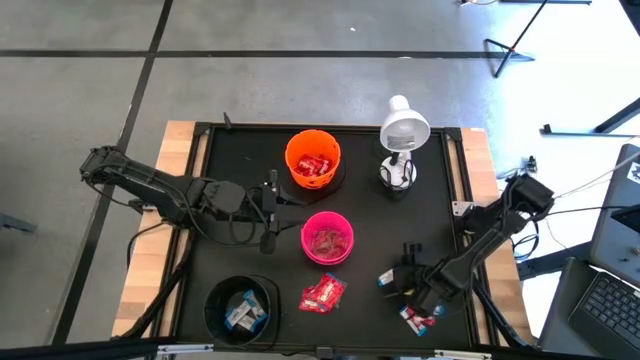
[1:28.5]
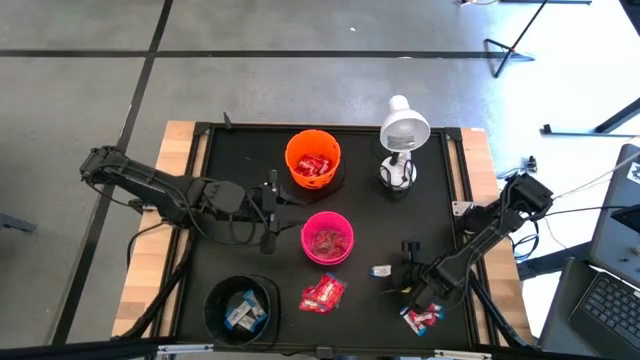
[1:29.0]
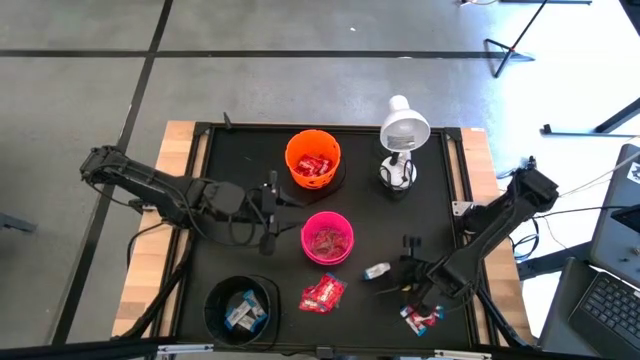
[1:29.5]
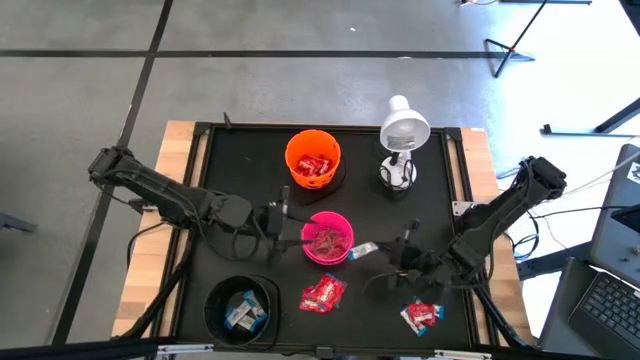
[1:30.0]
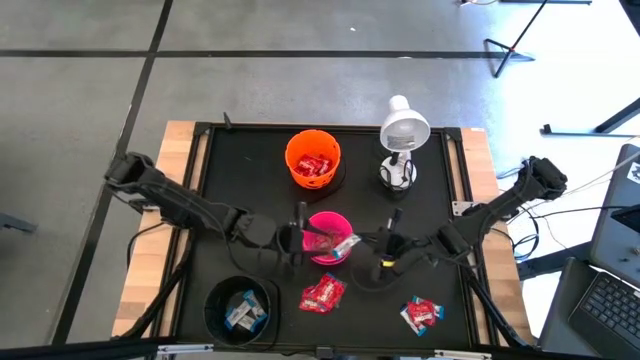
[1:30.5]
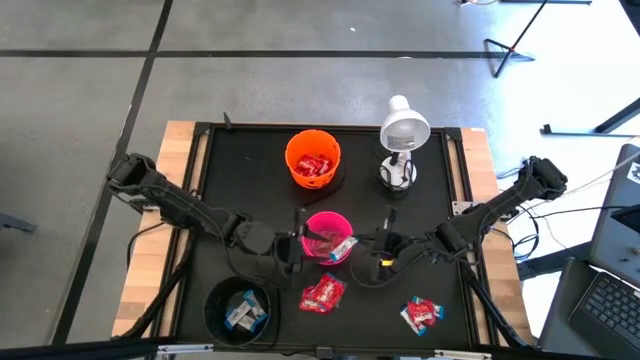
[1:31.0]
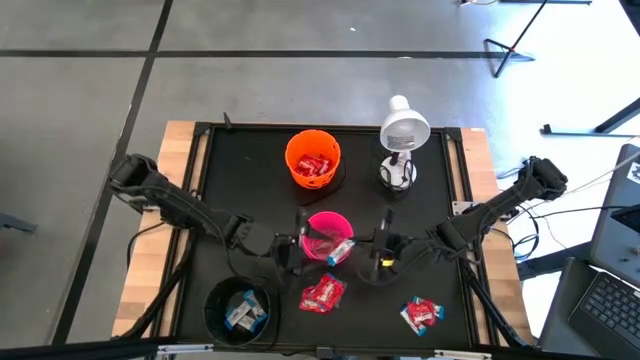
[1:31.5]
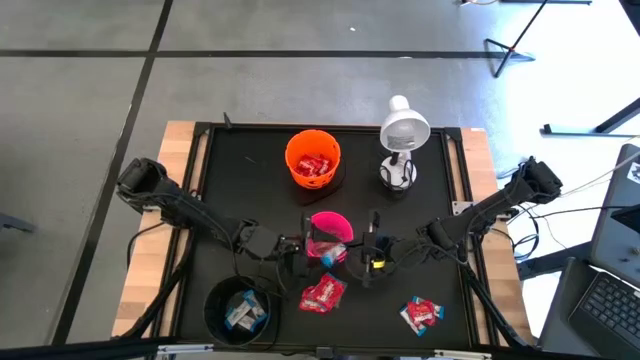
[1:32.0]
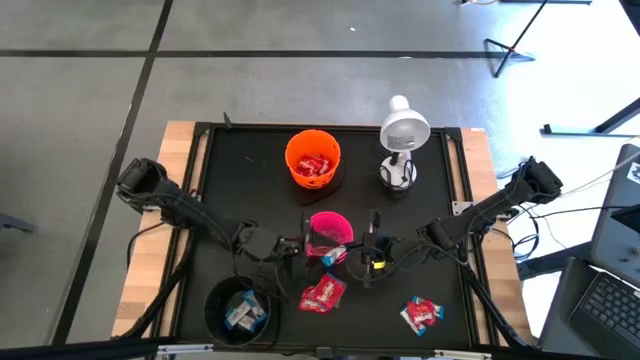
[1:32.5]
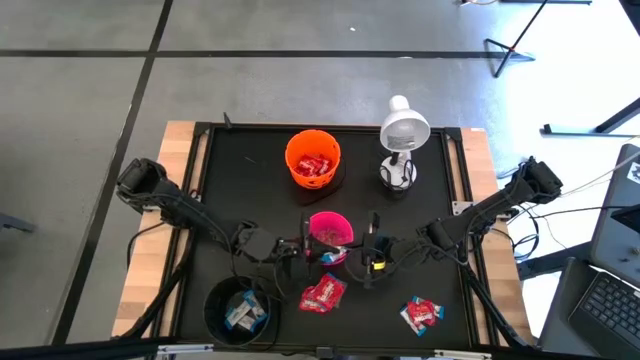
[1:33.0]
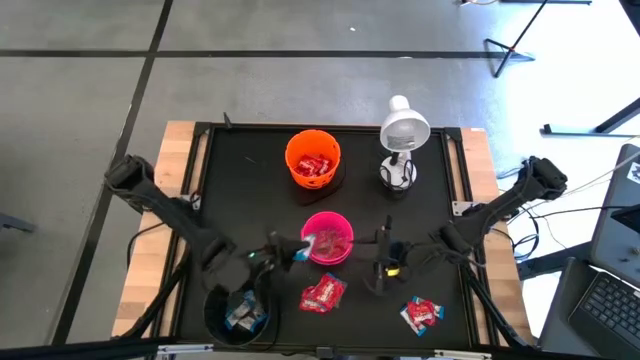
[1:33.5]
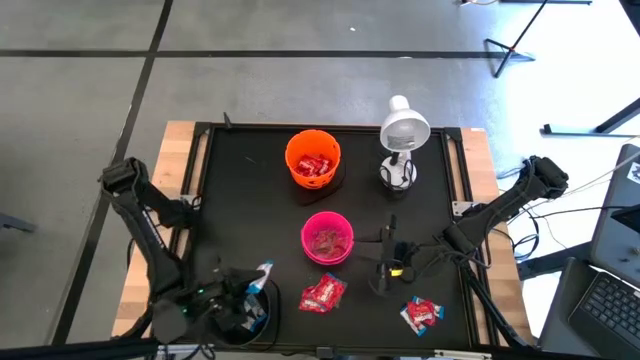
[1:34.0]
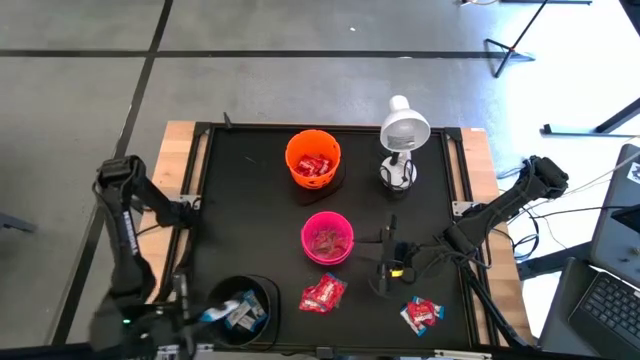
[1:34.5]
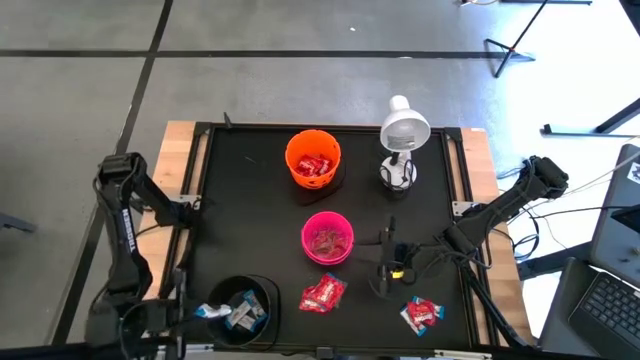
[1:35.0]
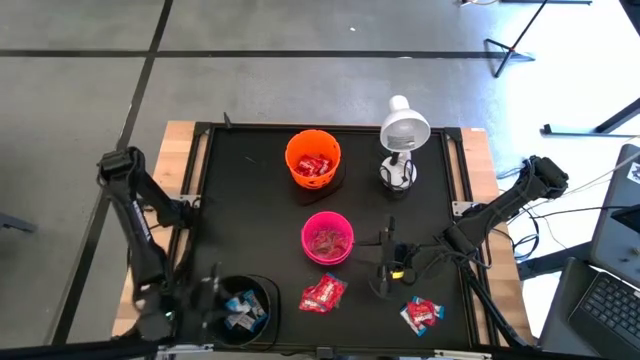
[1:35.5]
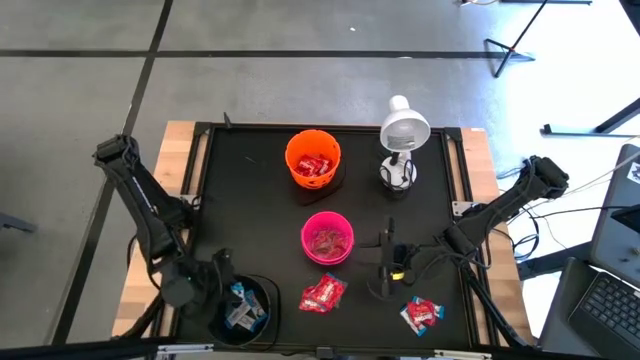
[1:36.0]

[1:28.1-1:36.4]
Task: Sort candy
Put the white chocolate into the black bucket

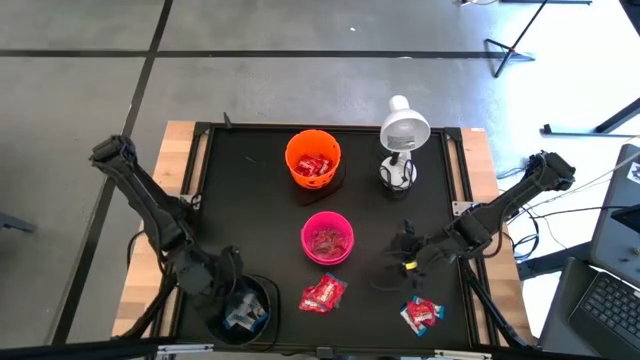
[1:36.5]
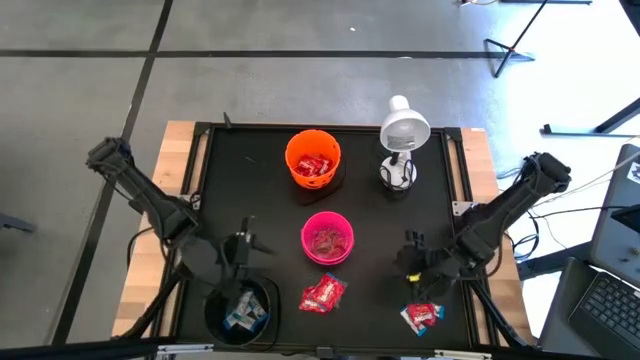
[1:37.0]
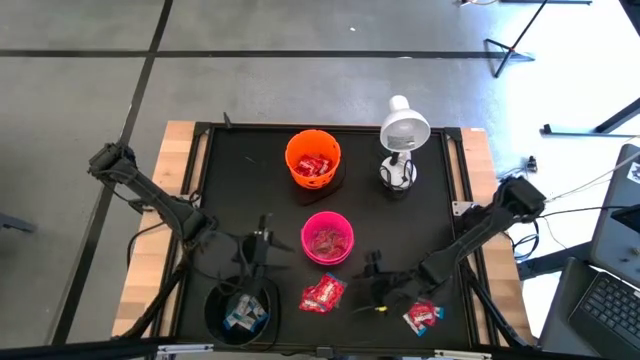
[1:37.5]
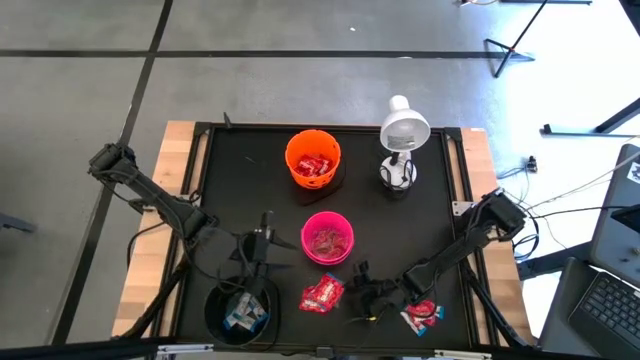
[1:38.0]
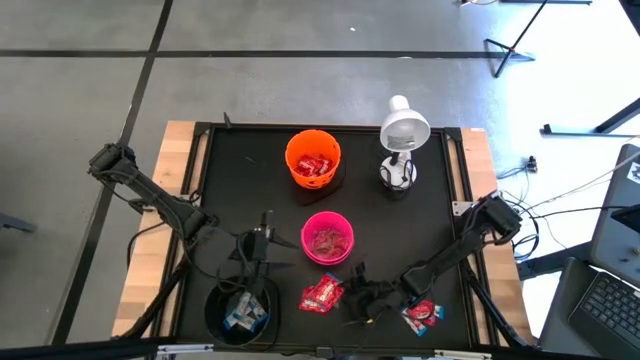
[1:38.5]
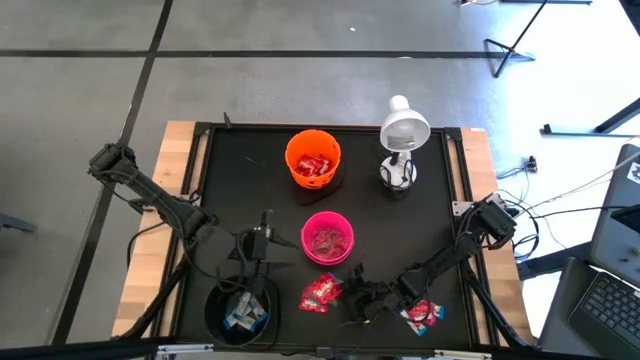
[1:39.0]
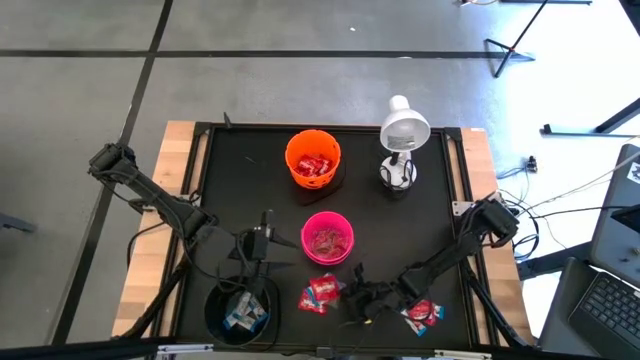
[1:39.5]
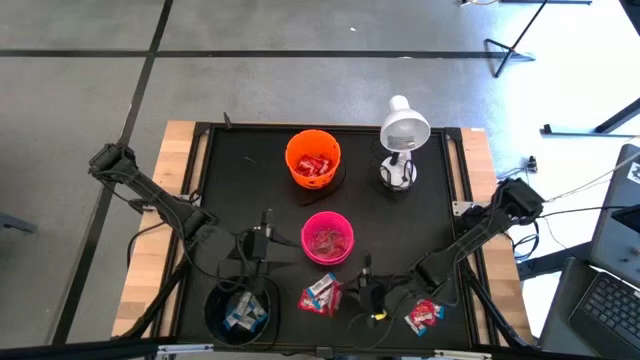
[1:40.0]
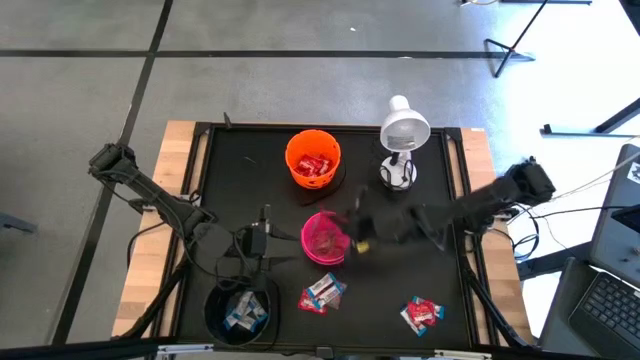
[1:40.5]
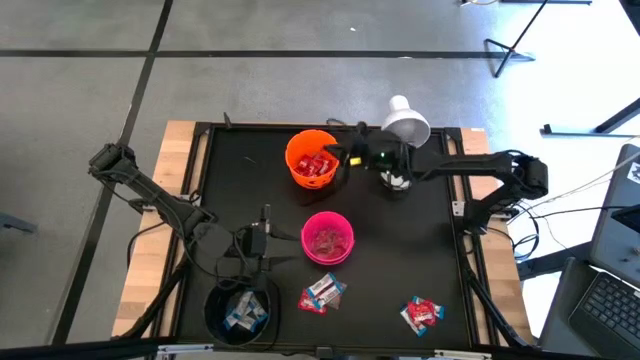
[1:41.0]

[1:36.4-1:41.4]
Put the red candy into the orange bucket

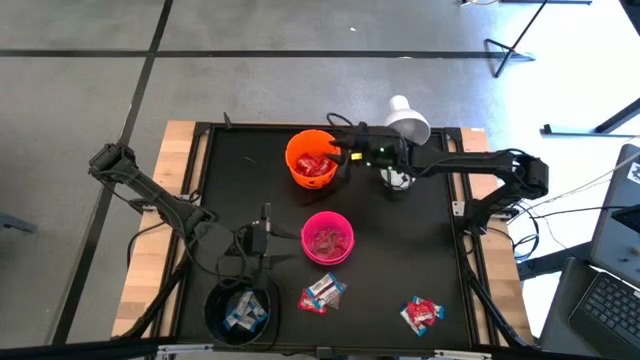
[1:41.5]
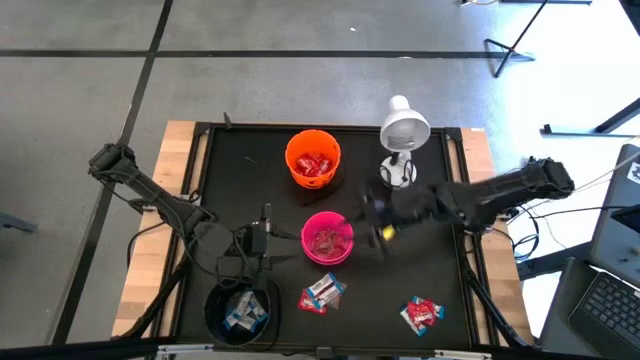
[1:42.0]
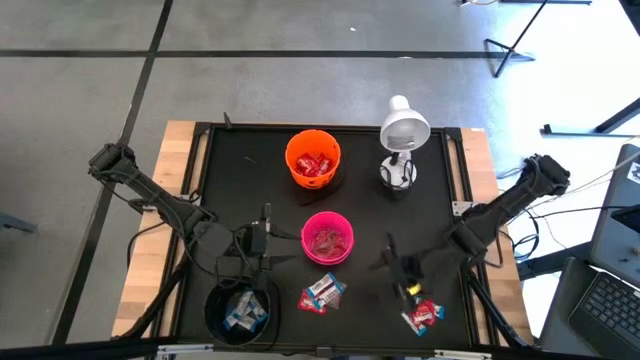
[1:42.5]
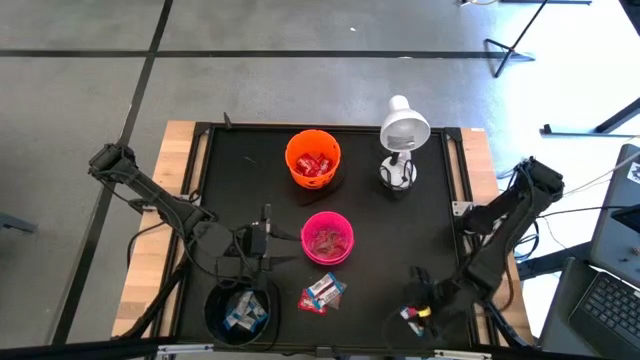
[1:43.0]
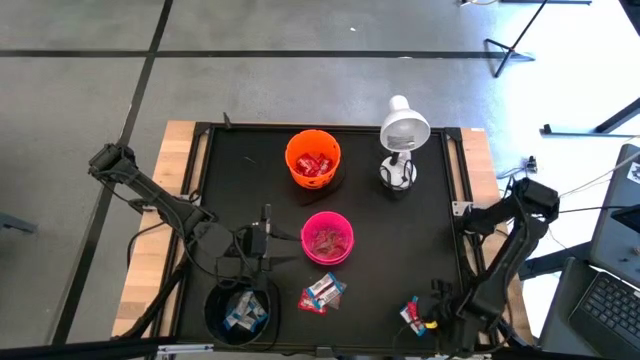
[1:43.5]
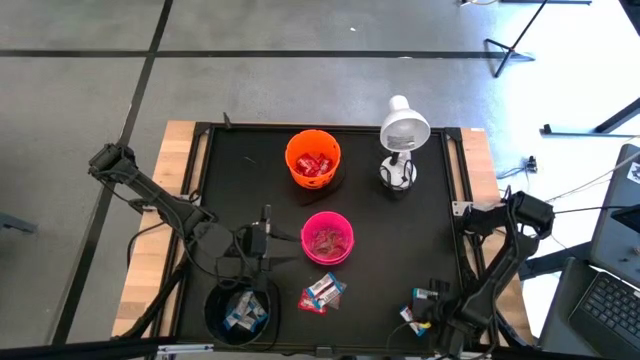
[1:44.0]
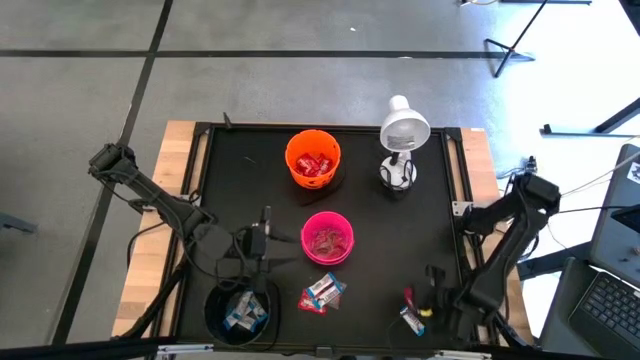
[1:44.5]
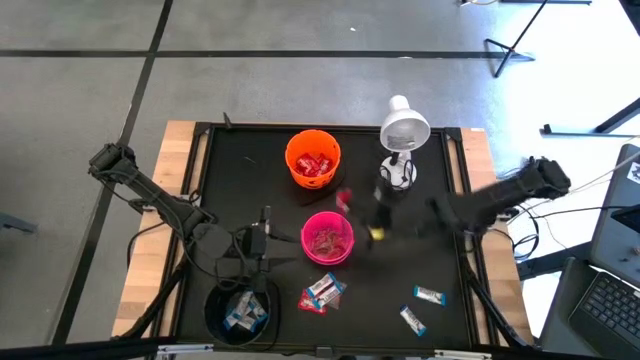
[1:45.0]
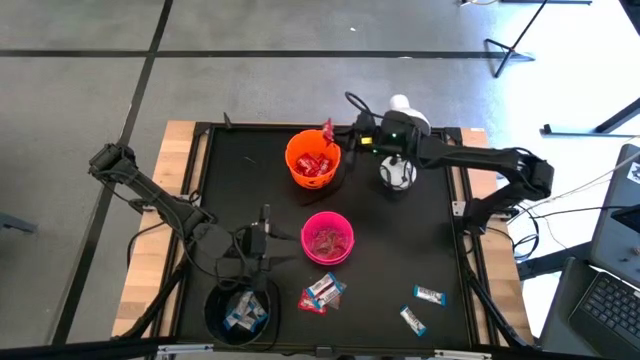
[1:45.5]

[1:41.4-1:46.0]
Put the red candy into the orange bucket

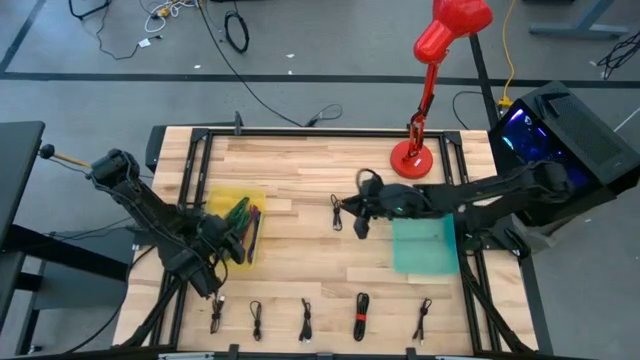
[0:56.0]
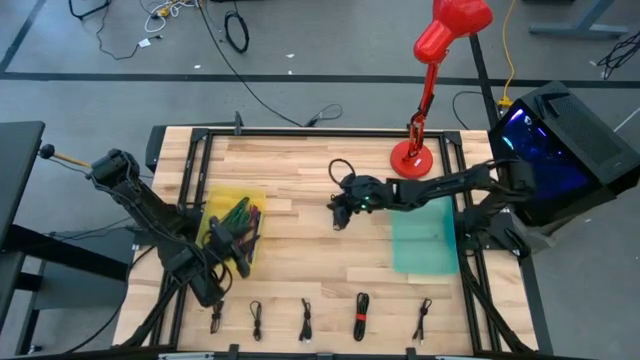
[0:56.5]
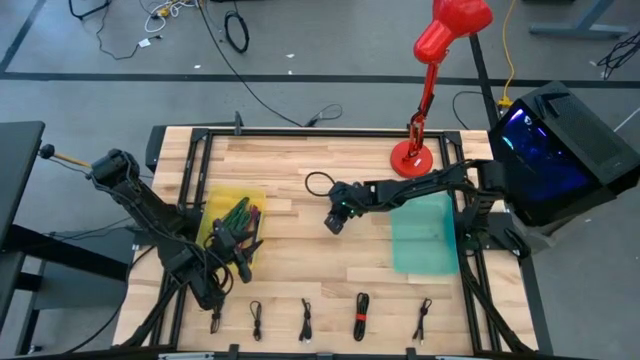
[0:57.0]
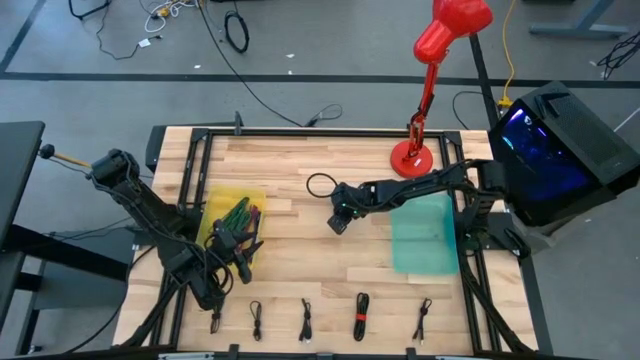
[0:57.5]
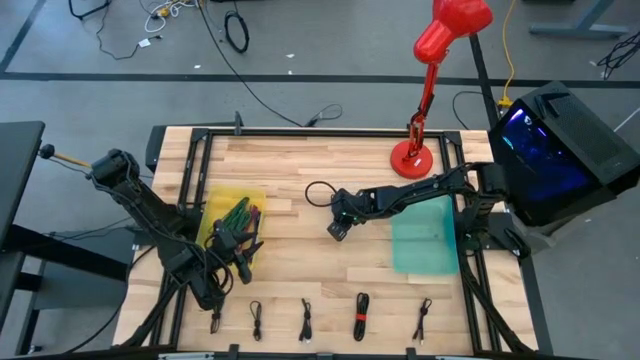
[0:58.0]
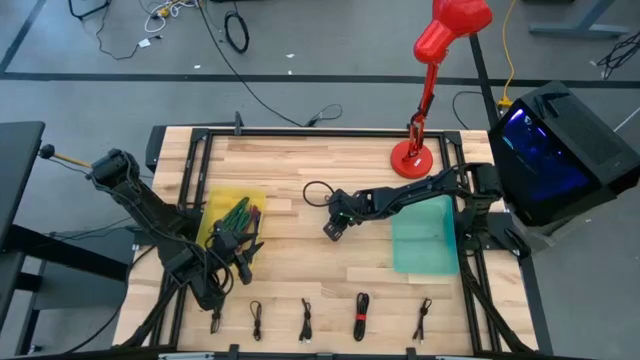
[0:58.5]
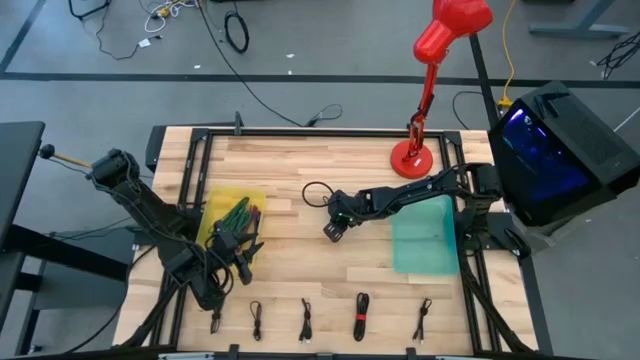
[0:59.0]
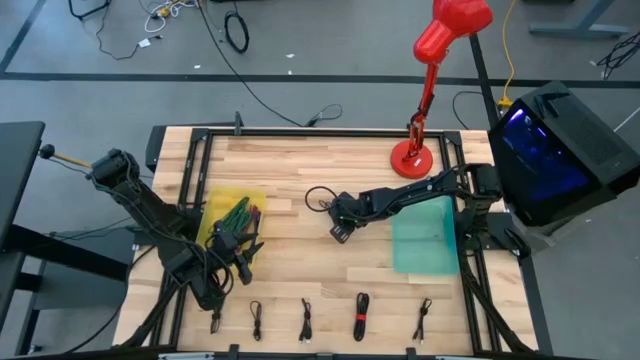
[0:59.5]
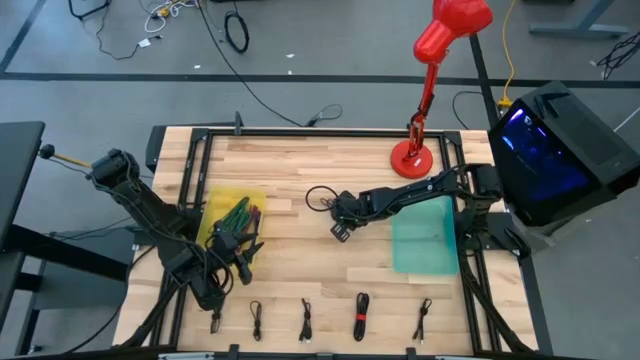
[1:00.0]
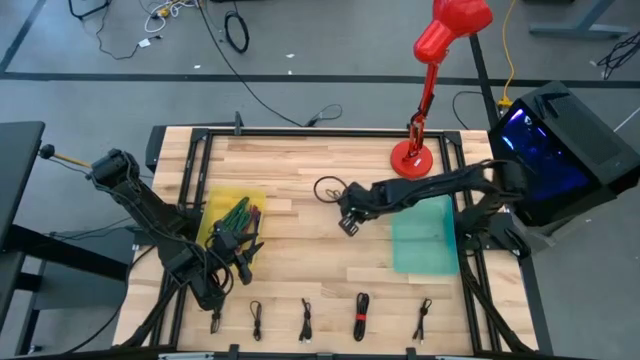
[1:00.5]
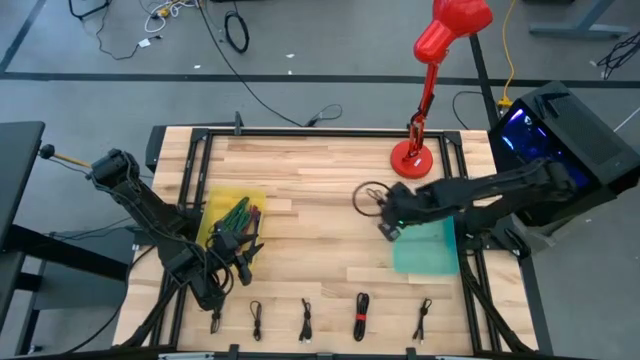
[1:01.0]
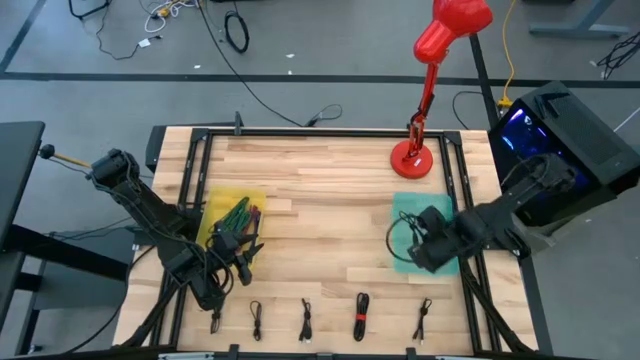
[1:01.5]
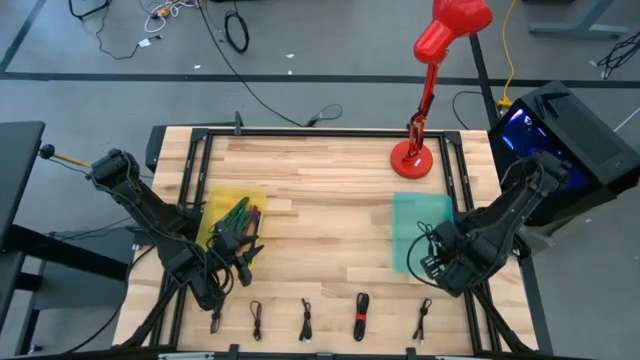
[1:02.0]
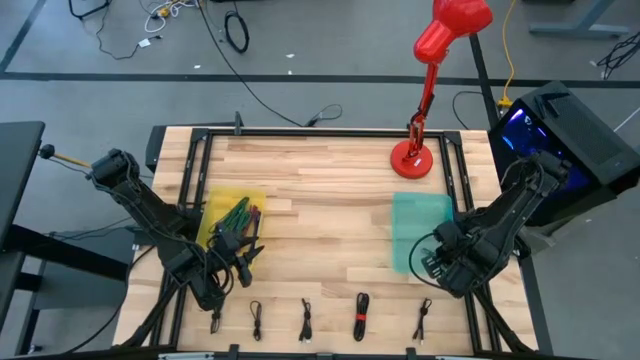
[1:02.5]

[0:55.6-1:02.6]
Task: Pick & Place USB Port
Put the black charger cable into the green bin
